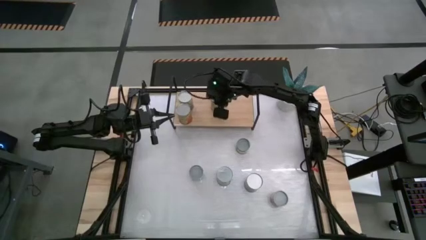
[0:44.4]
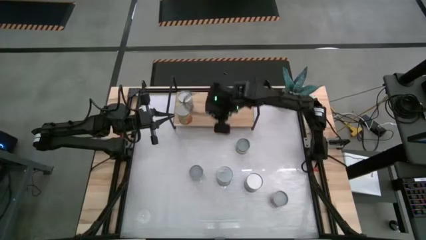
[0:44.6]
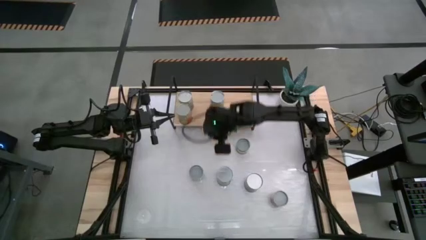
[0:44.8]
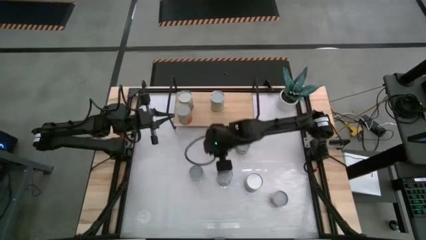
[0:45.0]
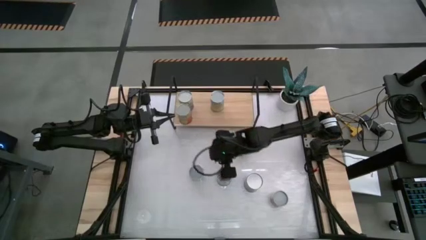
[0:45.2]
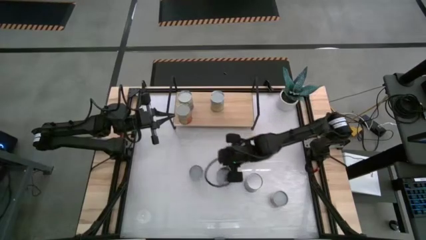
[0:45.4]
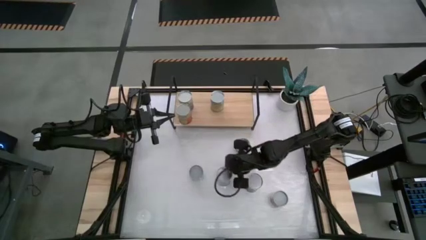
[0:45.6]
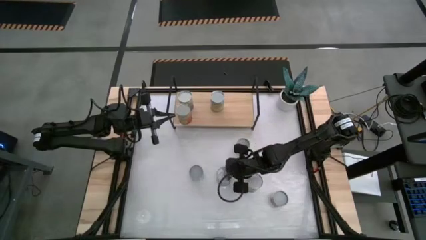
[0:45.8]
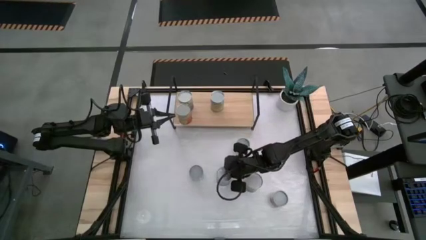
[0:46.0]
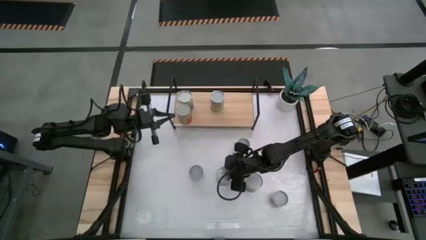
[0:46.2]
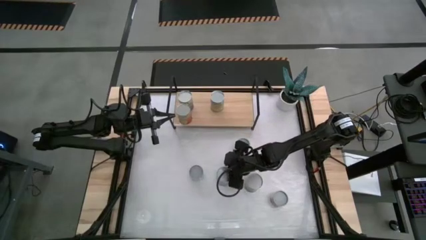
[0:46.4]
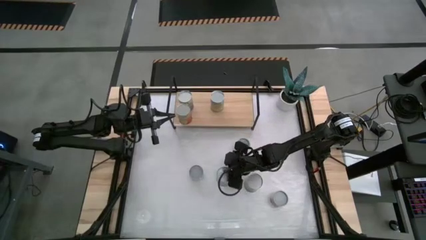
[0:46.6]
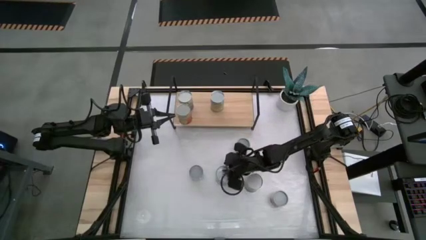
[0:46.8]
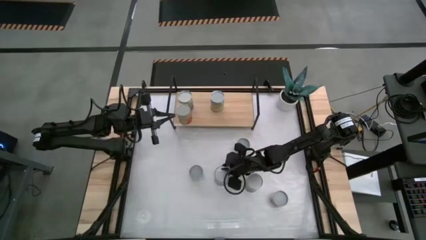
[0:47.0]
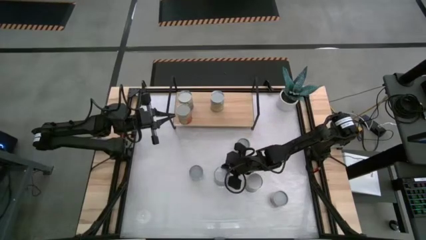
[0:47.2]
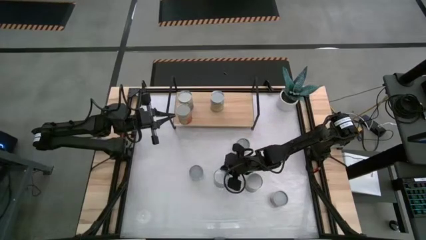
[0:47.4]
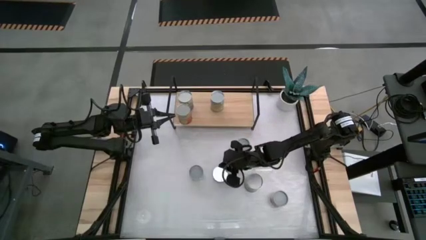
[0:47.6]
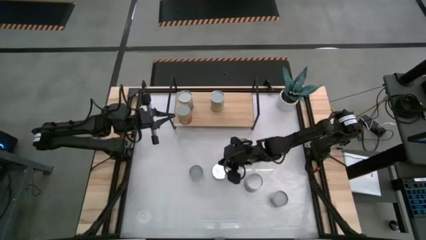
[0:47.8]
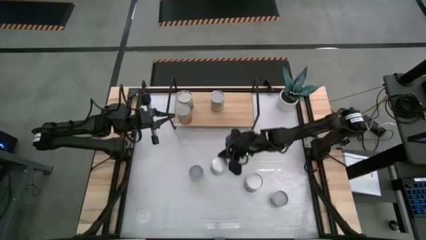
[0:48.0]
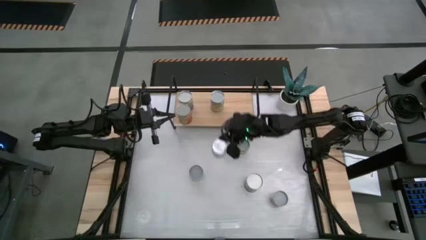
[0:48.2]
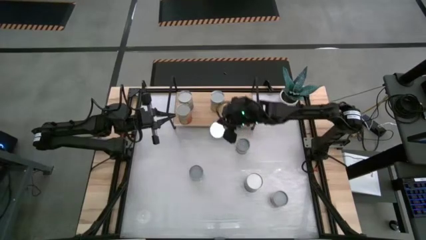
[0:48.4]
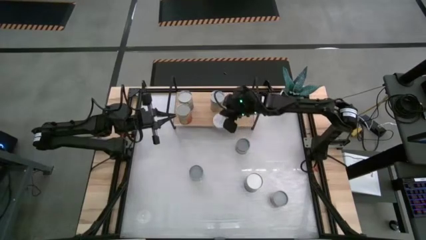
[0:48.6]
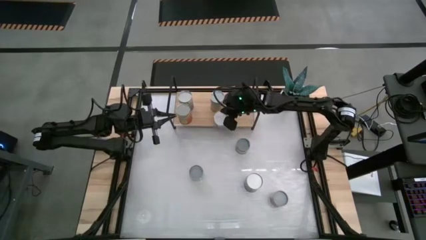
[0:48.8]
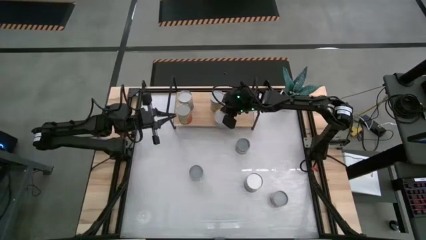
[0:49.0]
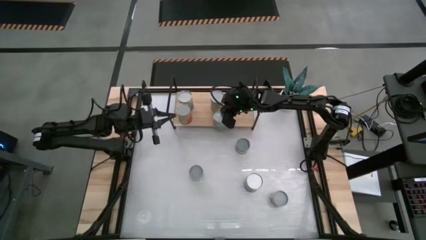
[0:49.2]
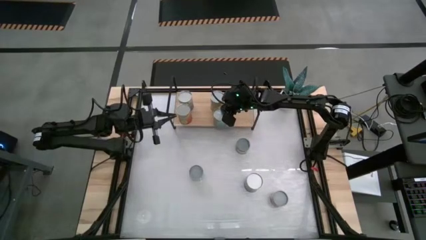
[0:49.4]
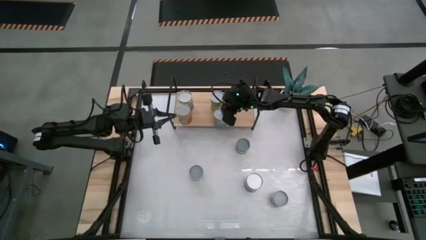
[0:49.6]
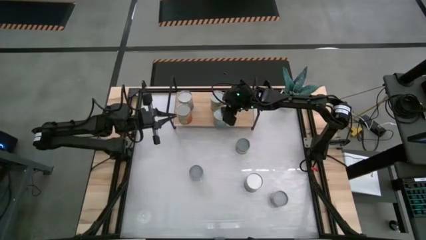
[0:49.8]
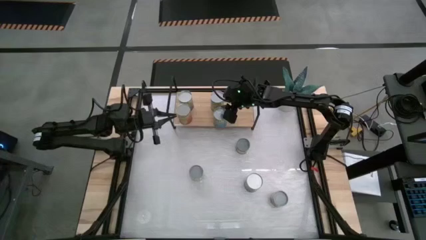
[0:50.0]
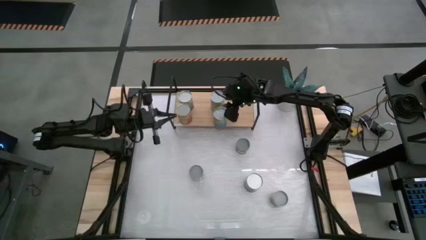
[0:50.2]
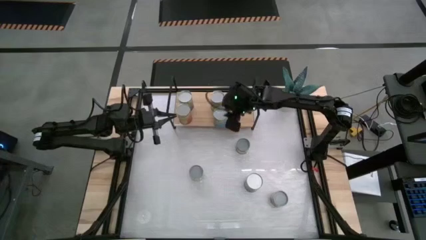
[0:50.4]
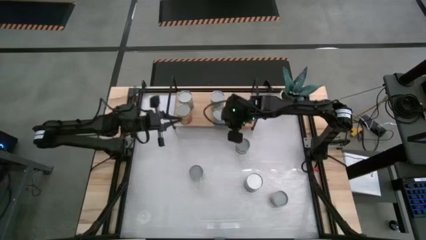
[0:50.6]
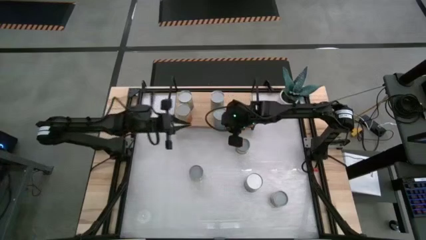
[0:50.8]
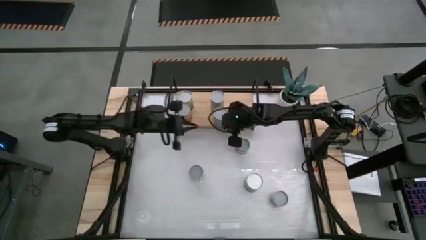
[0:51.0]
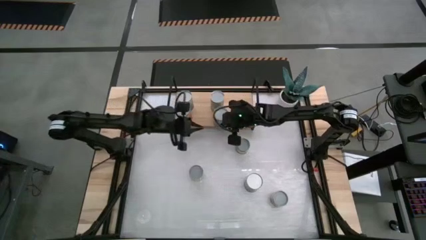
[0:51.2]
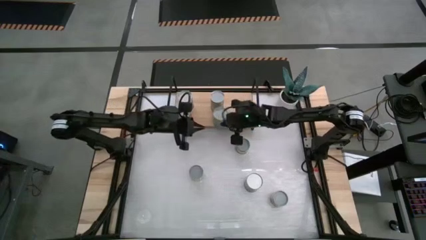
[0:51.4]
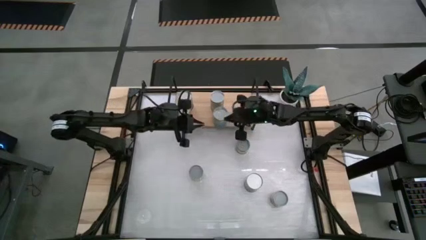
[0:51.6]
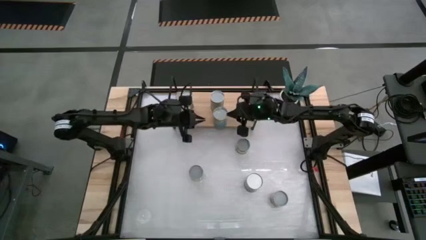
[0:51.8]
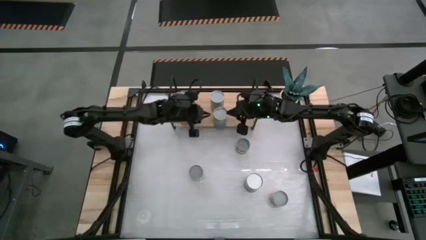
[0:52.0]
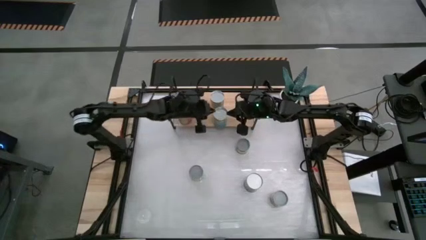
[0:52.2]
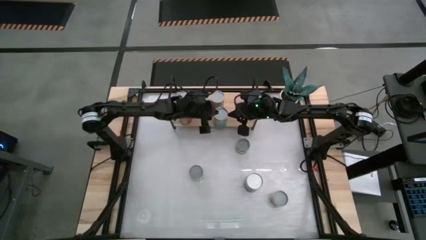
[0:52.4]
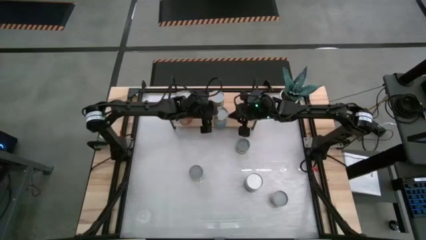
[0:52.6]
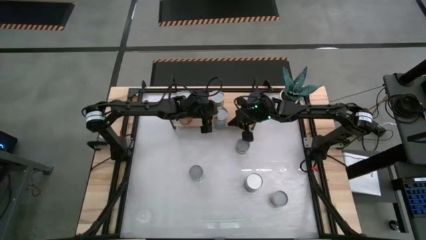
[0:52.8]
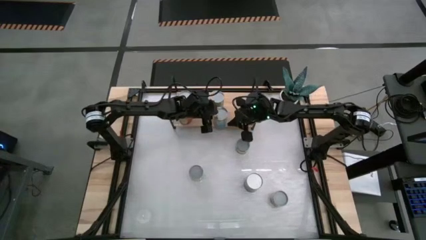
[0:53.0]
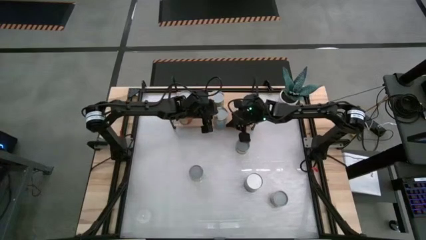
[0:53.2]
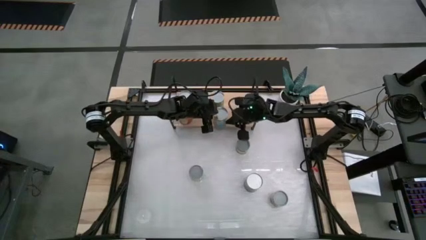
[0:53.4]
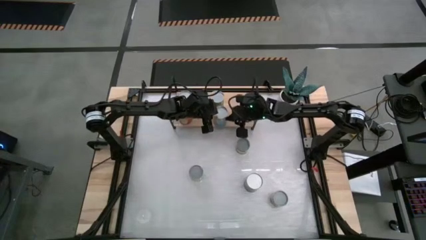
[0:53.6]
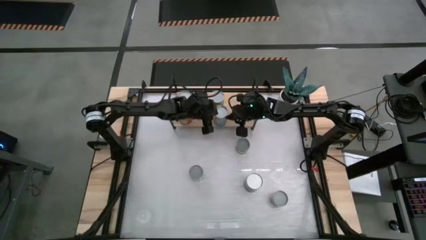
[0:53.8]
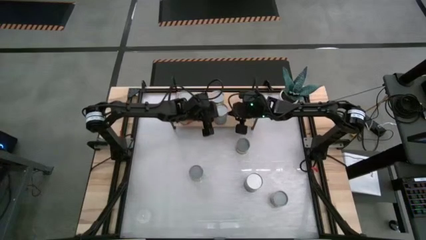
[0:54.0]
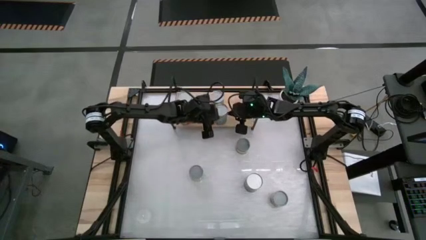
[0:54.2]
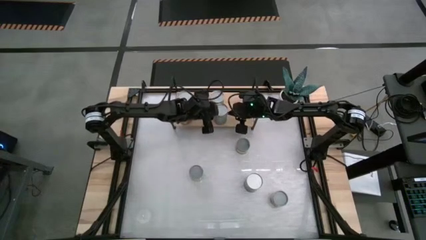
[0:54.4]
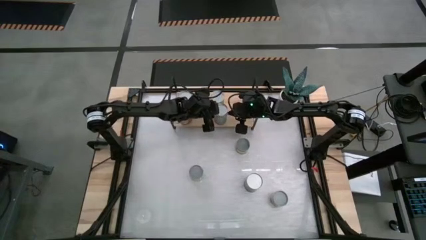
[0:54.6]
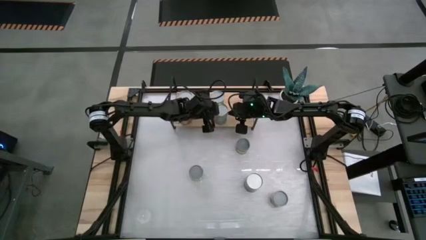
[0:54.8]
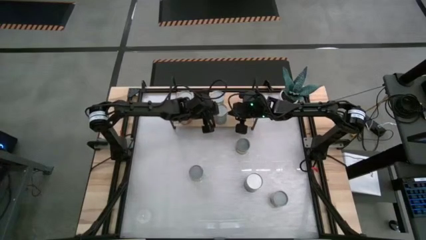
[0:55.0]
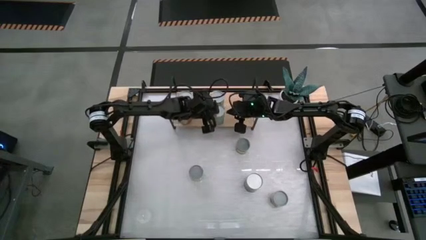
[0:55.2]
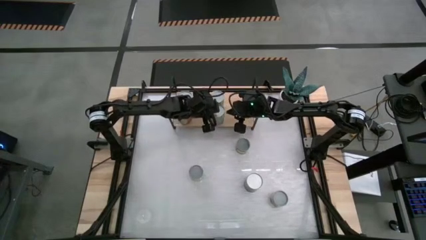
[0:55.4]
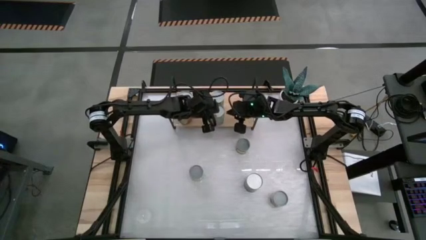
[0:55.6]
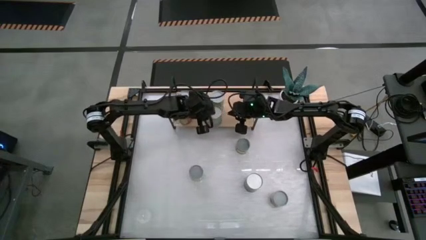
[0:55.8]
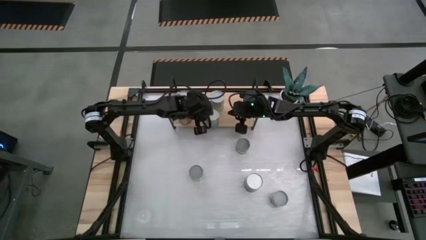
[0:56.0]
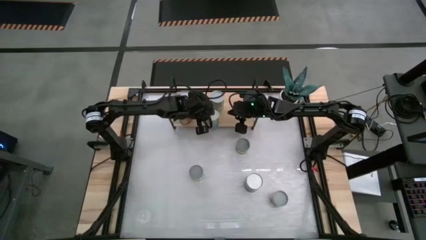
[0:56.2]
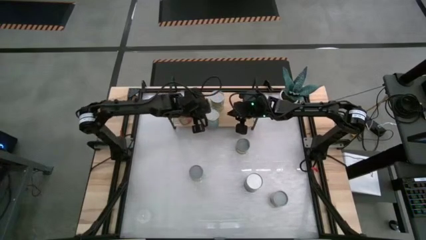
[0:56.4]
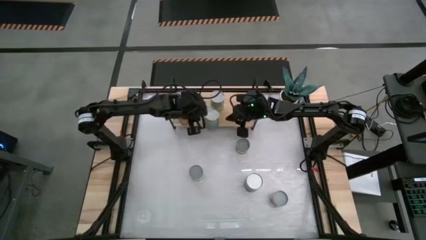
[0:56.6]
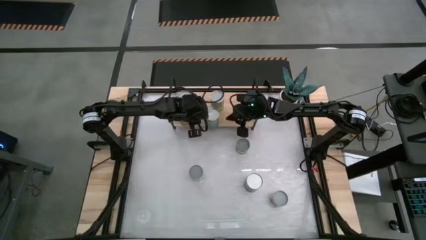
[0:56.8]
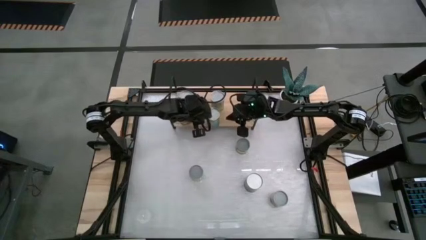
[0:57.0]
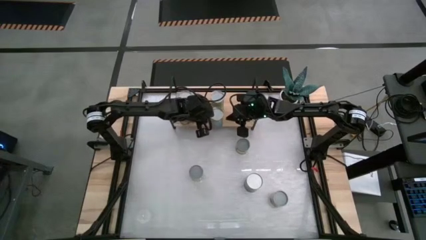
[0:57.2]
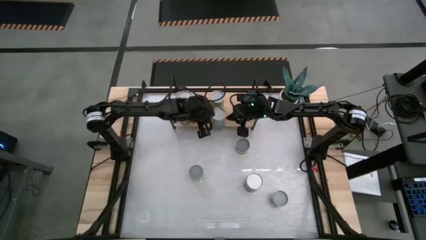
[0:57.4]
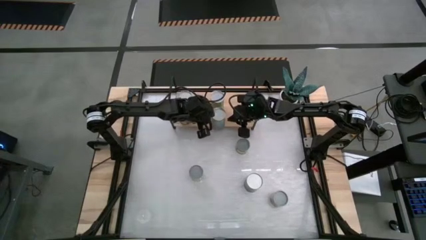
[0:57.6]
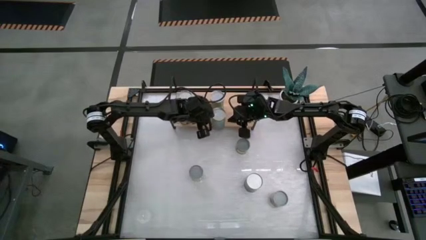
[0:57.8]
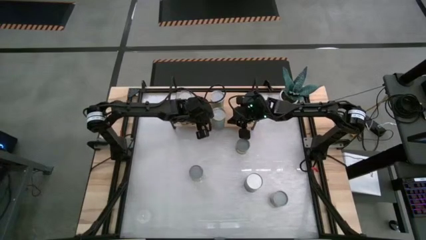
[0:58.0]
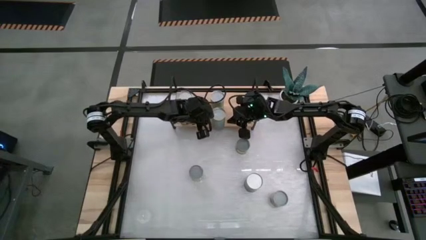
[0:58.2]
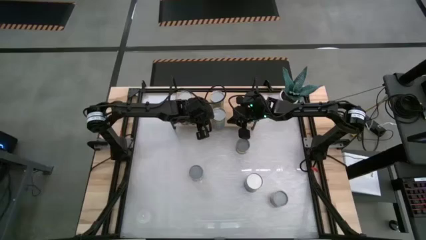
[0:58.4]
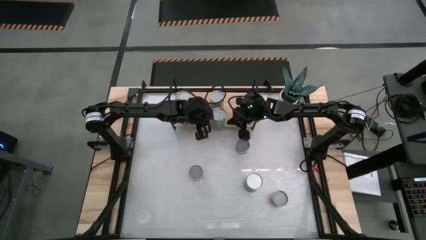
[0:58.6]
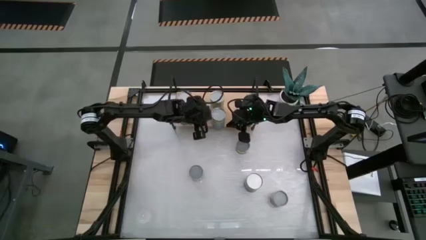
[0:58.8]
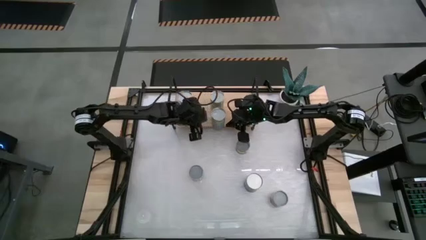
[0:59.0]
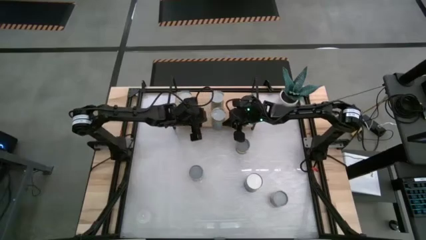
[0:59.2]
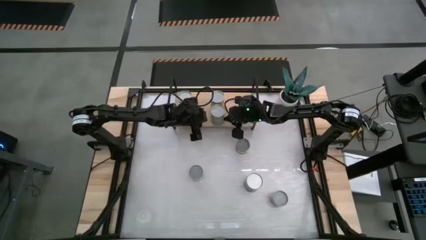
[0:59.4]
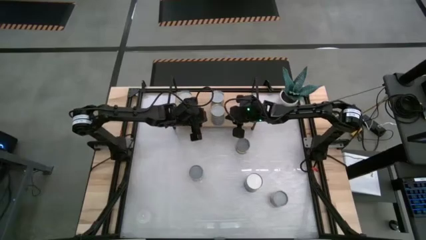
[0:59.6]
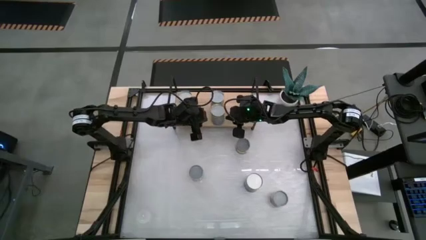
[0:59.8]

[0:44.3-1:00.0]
Task: Pick and place cans onto a shelf
Put the canned cherries on the shelf
